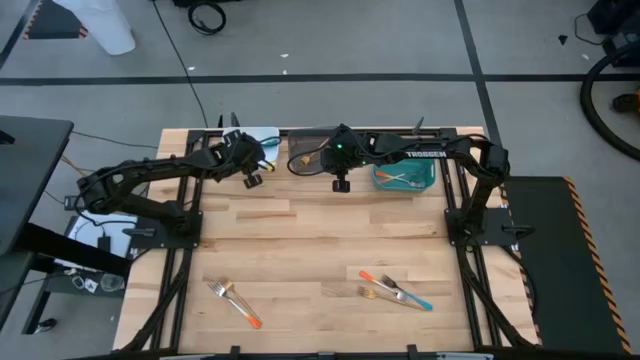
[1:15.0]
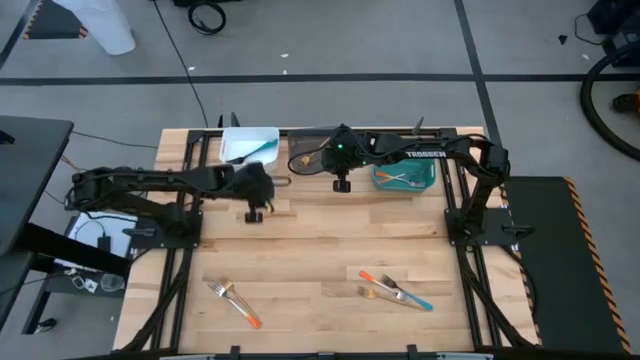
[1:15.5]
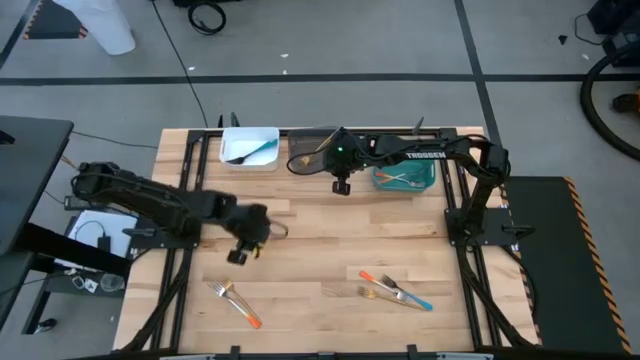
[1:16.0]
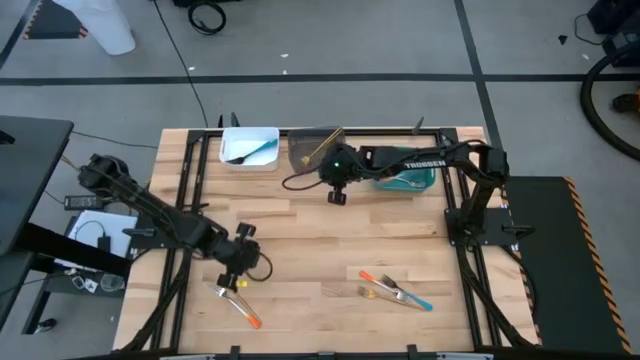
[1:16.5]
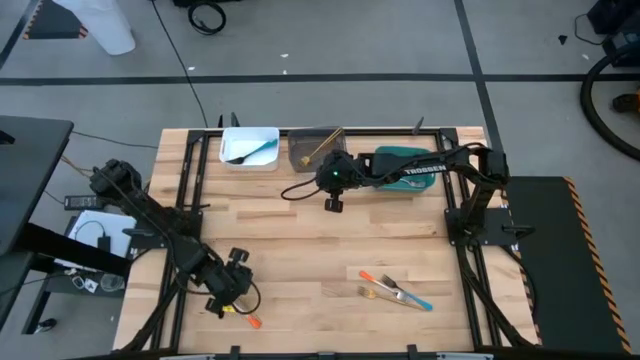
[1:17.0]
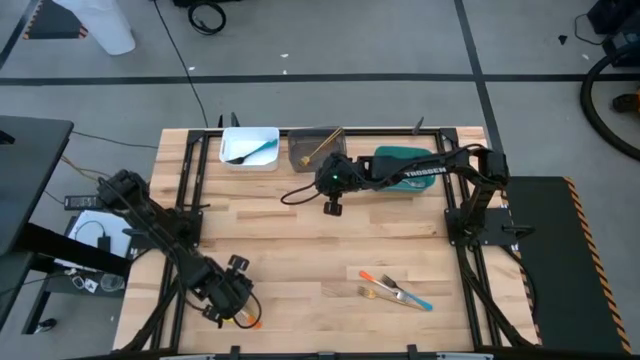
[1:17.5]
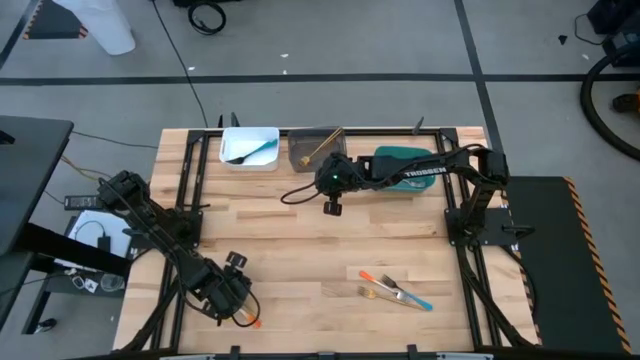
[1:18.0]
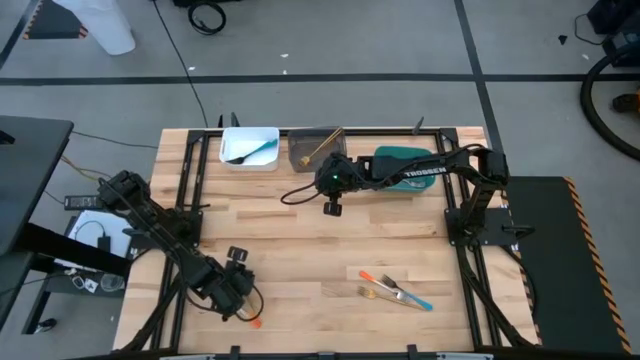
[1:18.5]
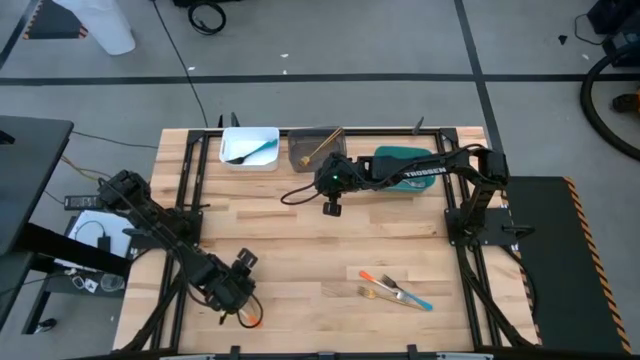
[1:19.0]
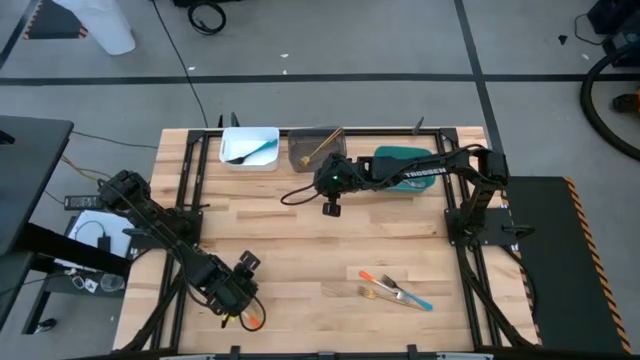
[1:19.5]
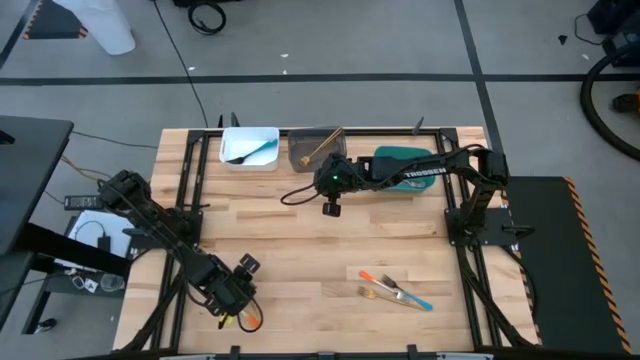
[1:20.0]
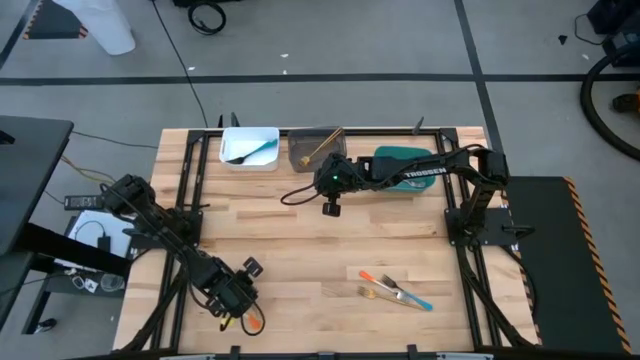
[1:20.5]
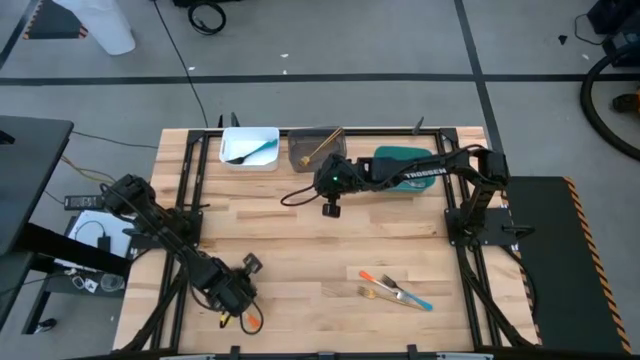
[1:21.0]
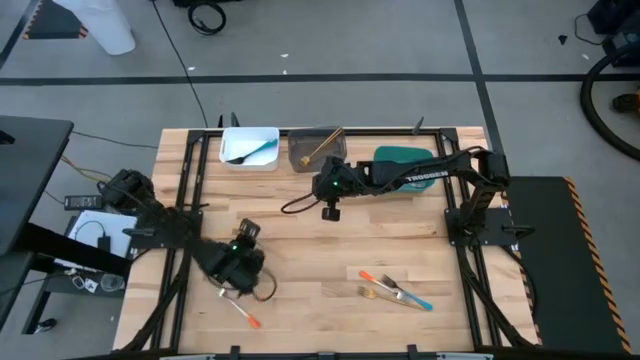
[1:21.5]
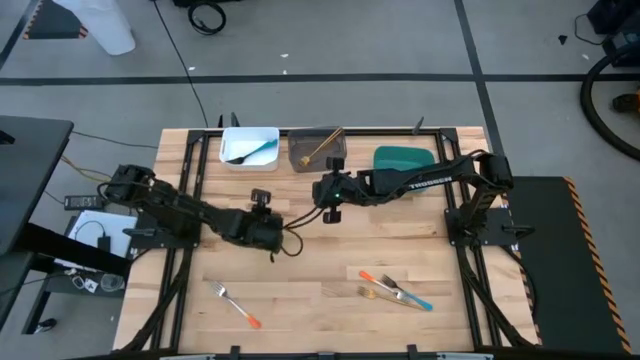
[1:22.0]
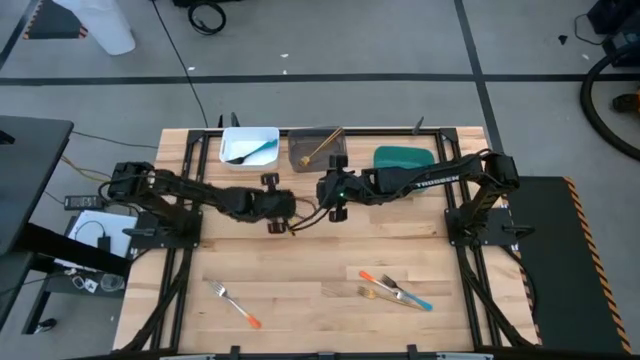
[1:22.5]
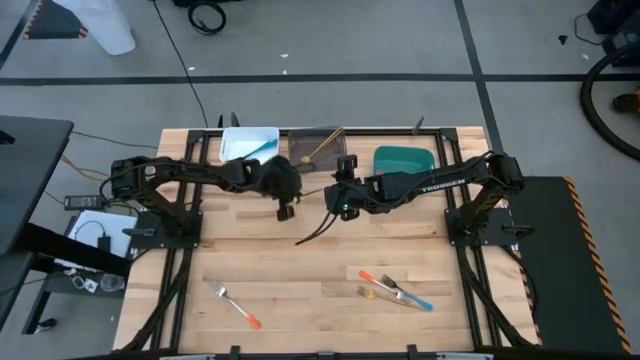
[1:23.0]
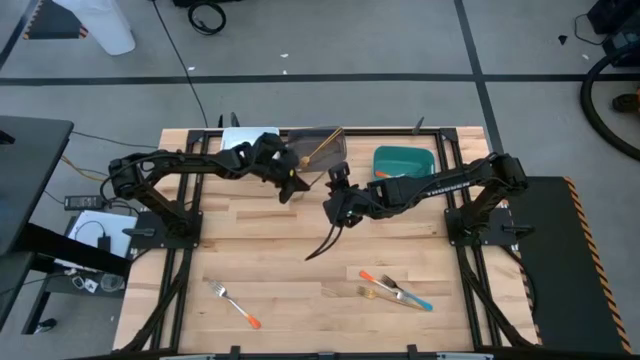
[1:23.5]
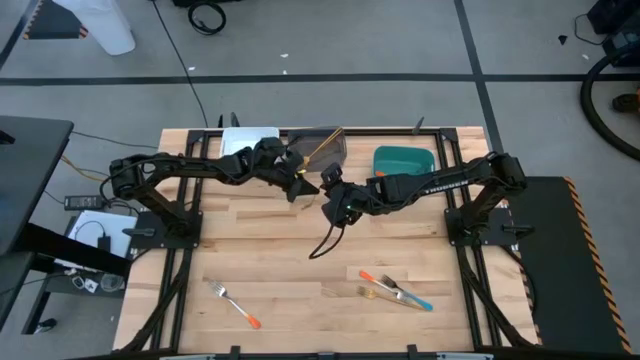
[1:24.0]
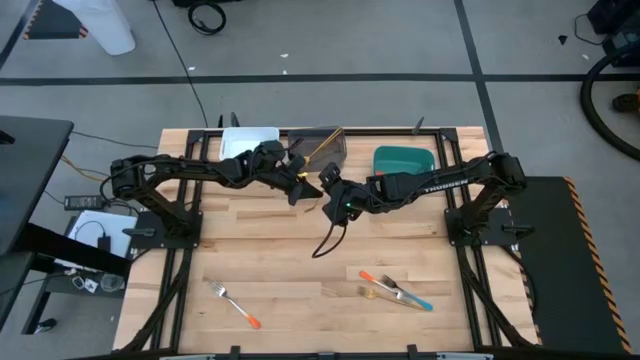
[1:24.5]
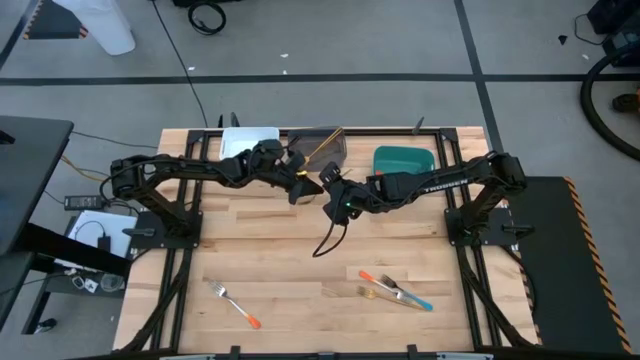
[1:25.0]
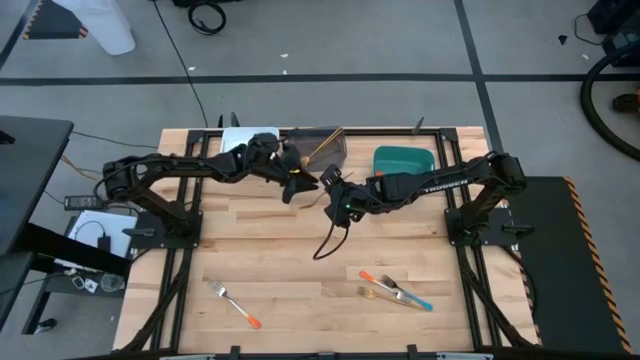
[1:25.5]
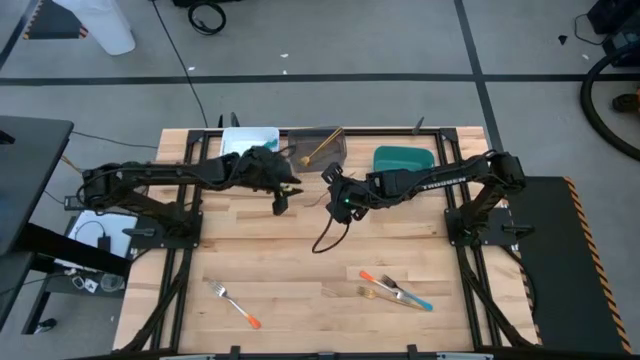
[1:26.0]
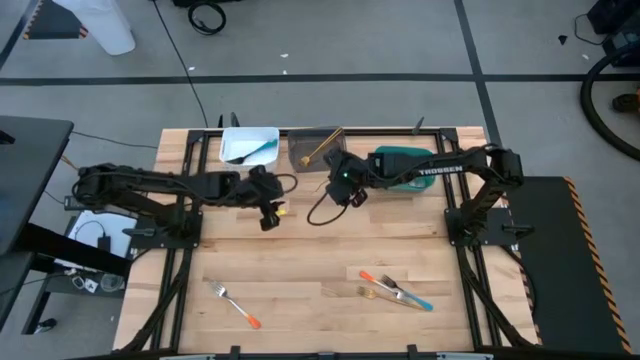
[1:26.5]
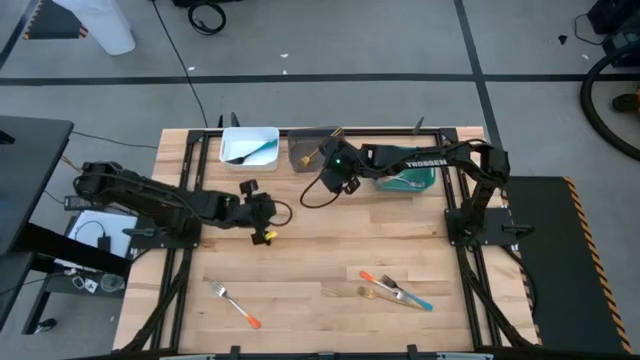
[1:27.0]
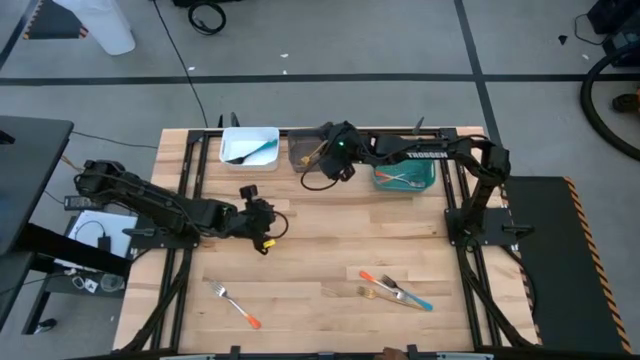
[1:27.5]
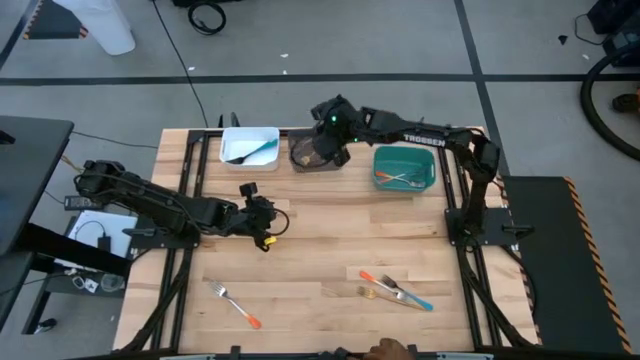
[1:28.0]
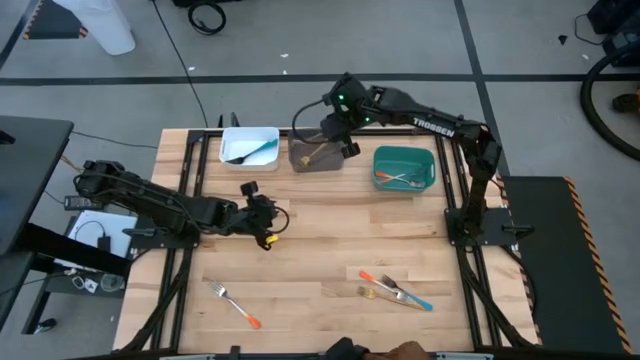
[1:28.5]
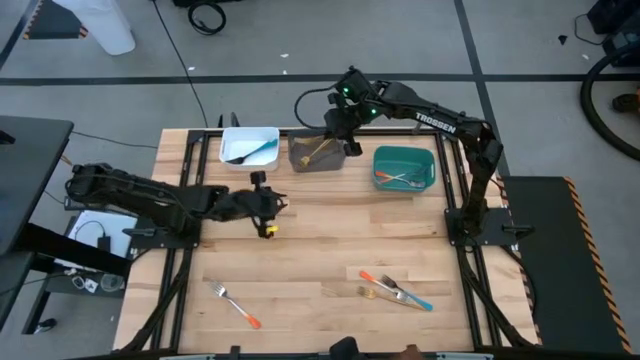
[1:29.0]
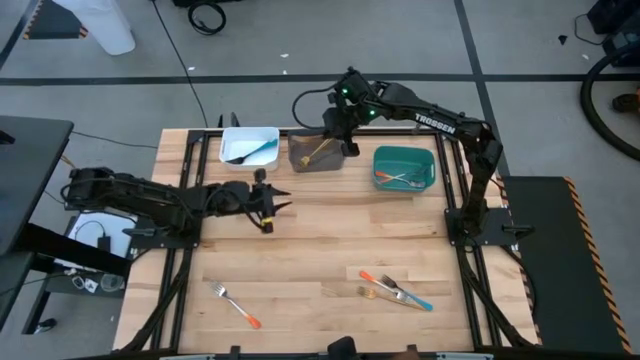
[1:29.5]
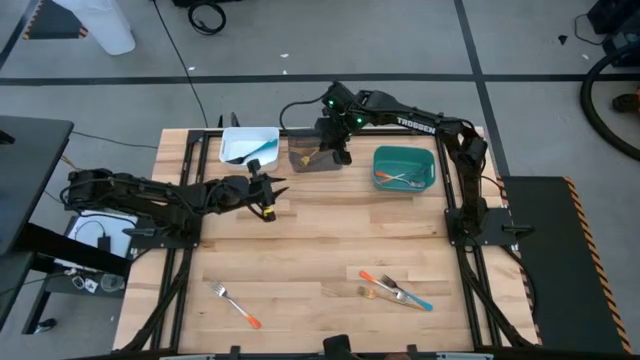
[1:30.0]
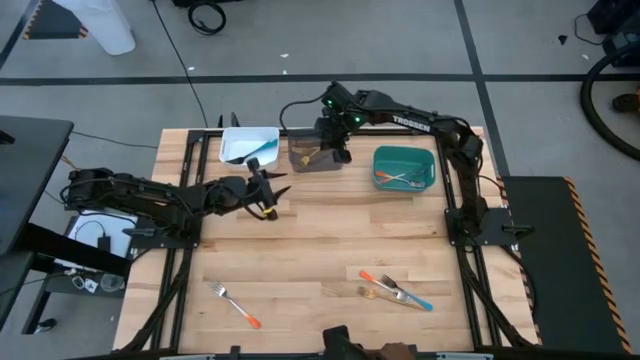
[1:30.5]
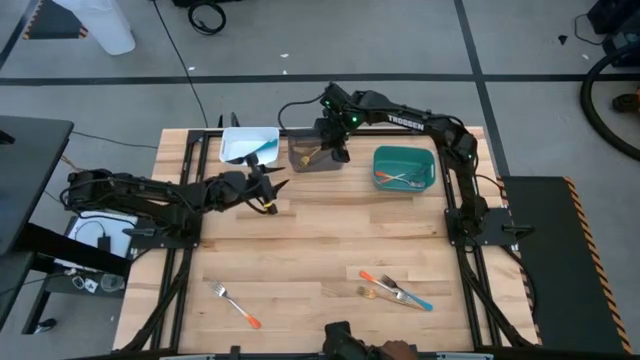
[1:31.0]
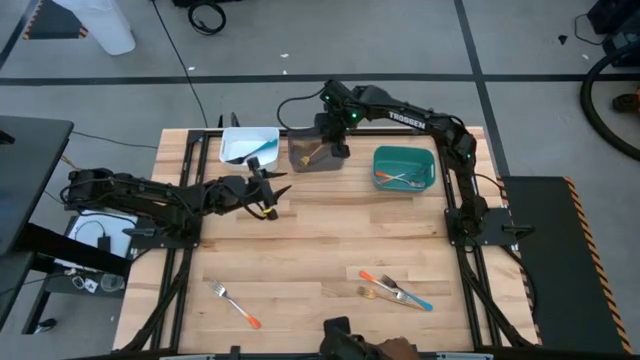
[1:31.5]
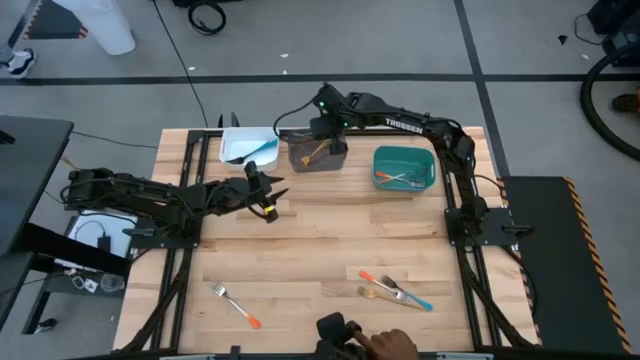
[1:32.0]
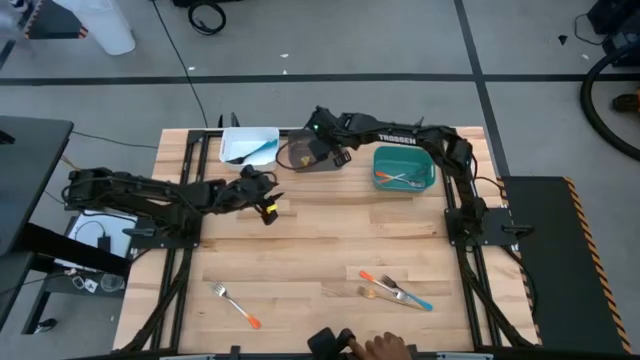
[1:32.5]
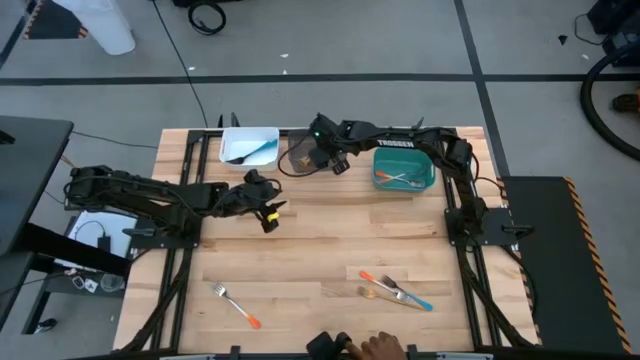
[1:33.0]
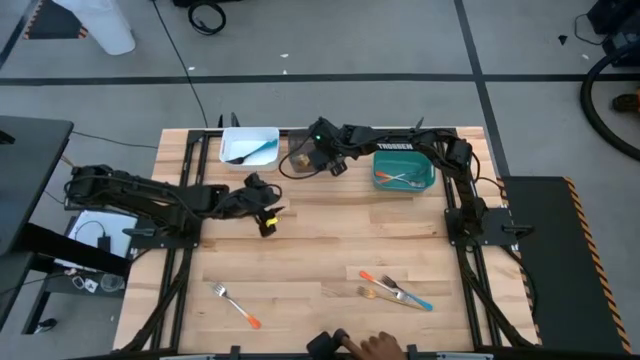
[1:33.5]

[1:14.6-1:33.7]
Task: Sort silverware by color (type)
Put the gold fork into the black bin
